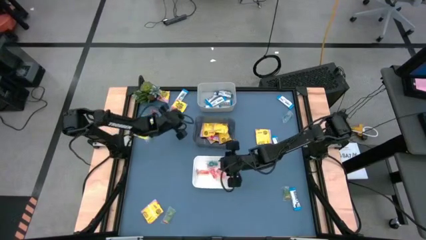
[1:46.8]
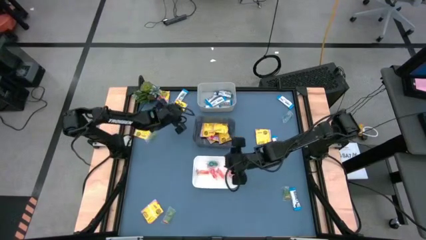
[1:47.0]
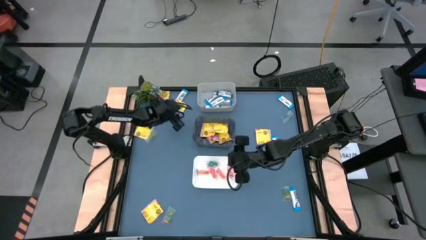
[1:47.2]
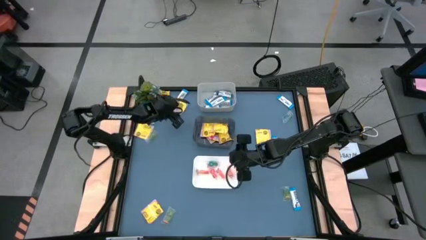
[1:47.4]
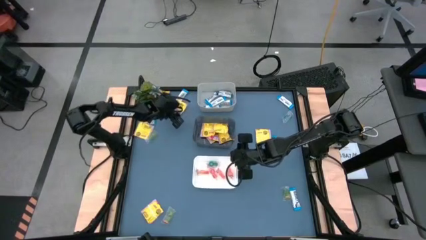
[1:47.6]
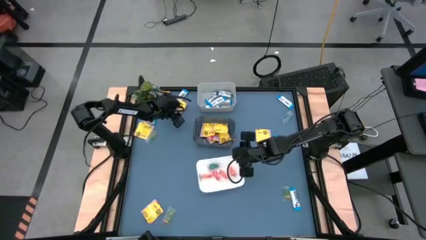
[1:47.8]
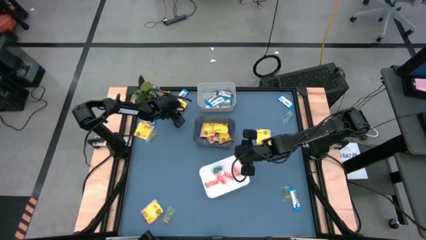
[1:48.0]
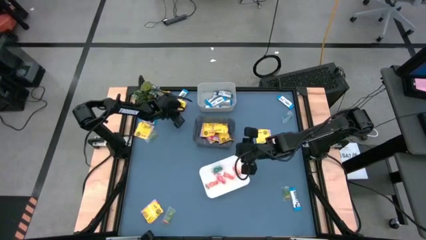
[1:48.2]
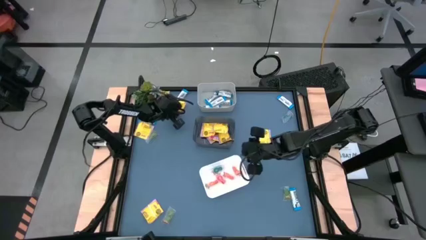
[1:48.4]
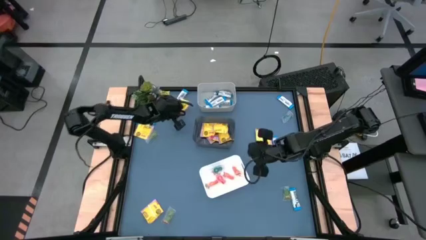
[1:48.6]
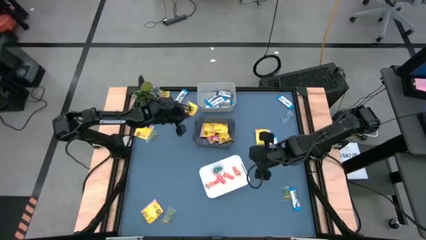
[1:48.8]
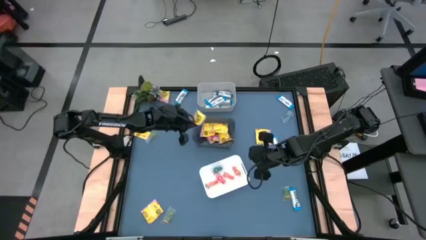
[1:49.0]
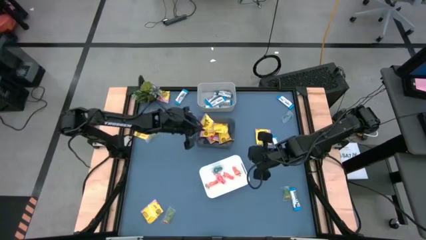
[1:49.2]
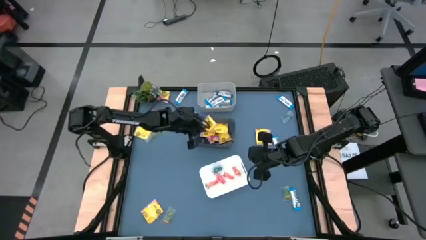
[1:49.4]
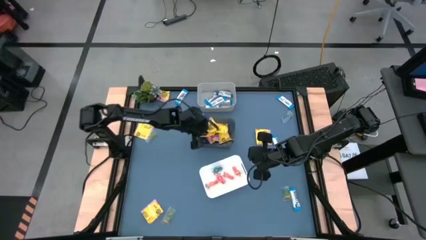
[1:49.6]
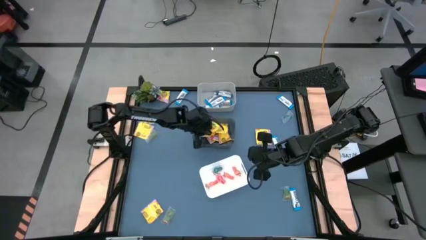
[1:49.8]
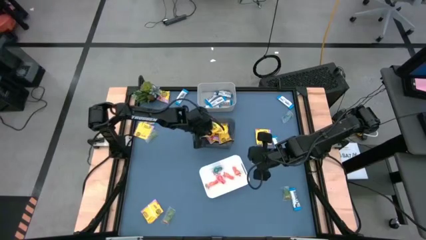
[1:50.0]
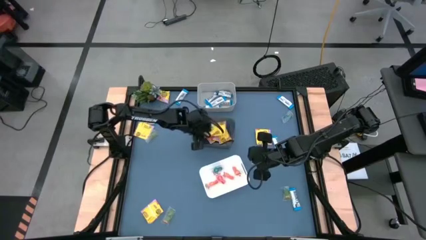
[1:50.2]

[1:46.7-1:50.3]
Task: Sort candy
Put the yellow candy into the black bin

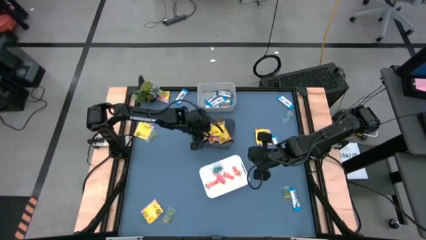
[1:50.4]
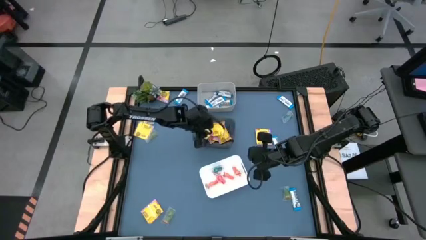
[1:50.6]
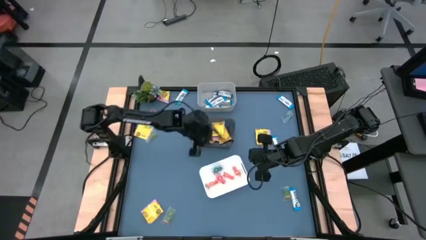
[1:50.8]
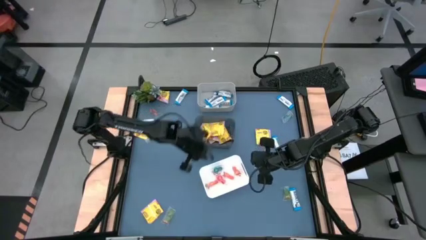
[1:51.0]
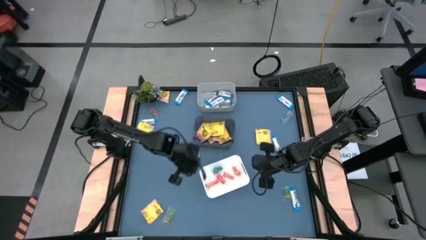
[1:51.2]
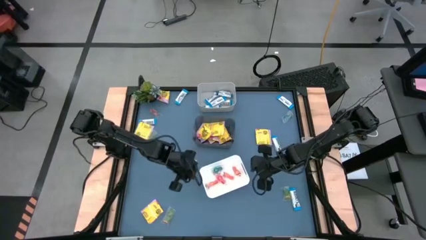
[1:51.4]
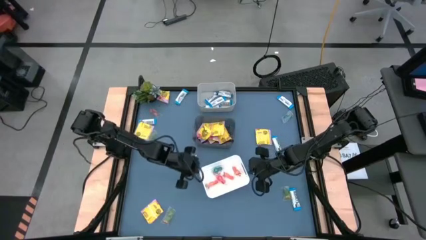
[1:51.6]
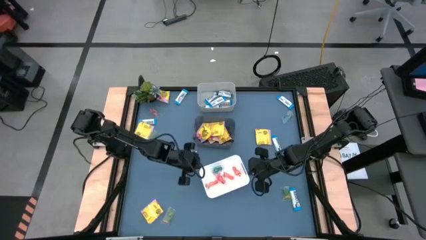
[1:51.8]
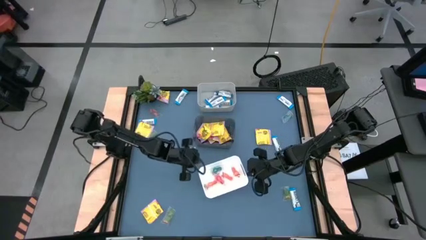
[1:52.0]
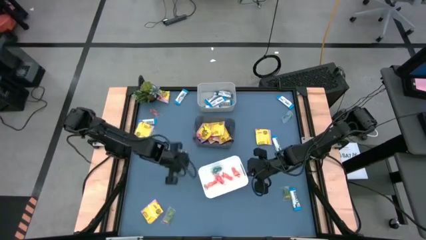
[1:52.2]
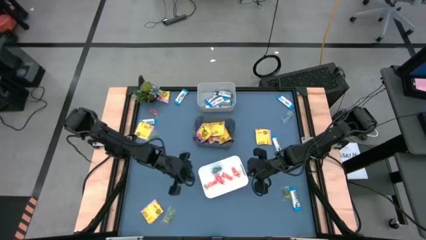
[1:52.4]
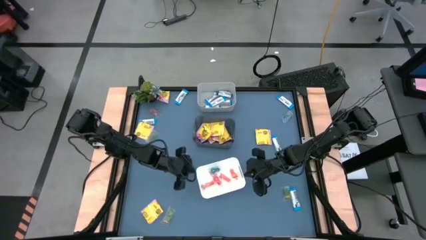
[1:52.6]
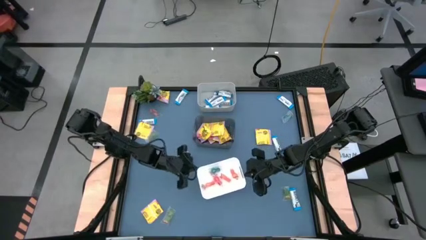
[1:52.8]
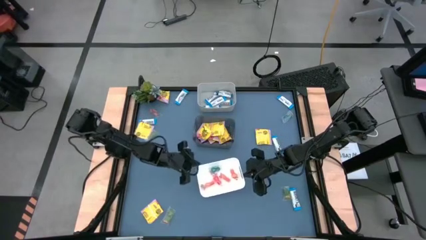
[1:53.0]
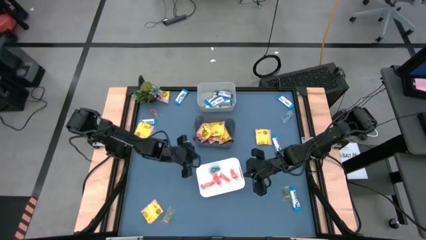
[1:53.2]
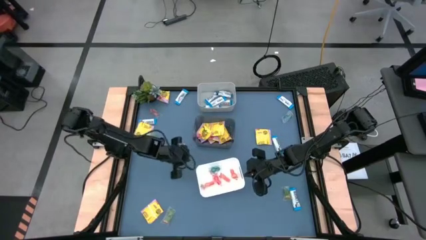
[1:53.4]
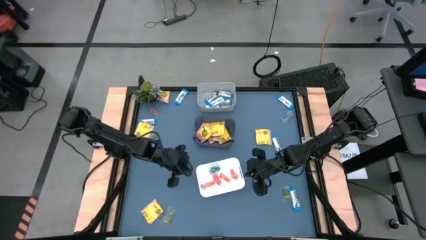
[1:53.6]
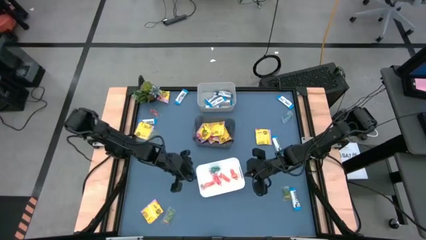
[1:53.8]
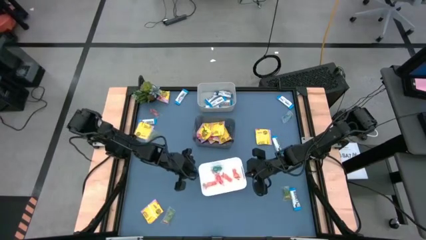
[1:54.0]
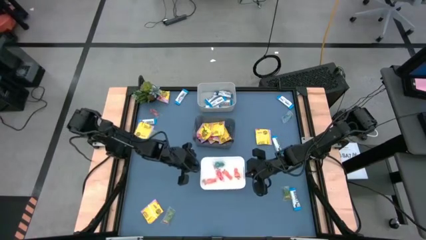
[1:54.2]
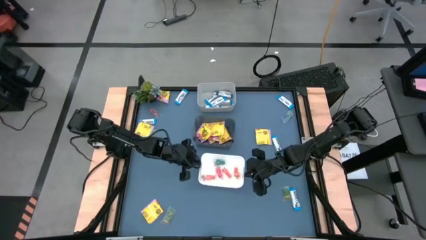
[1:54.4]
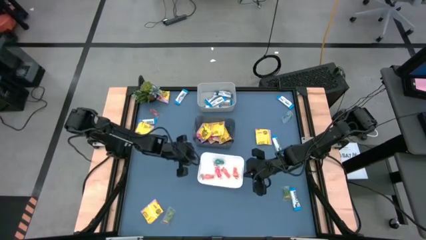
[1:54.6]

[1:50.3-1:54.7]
Adjust the white bin

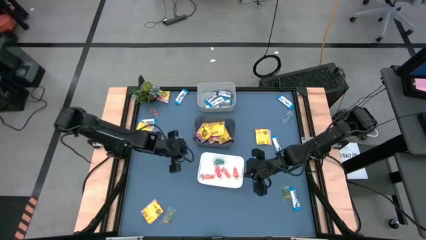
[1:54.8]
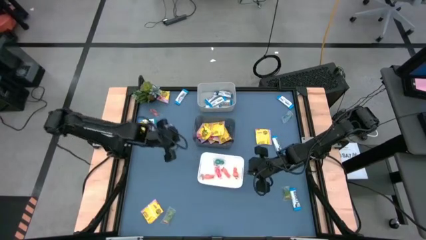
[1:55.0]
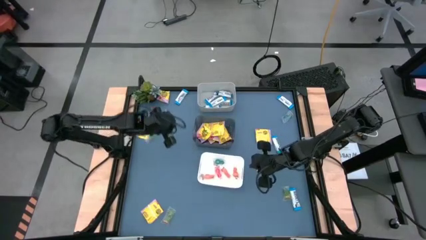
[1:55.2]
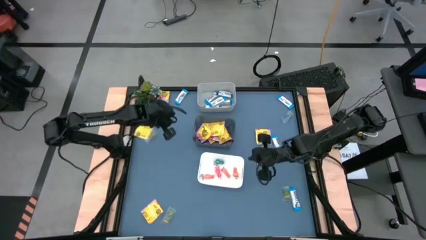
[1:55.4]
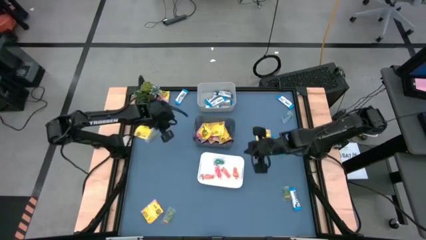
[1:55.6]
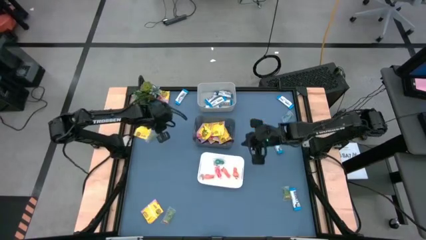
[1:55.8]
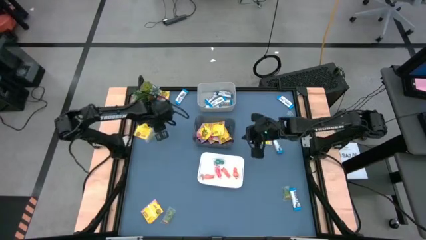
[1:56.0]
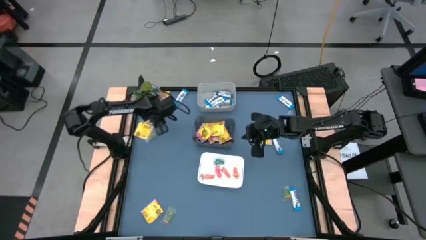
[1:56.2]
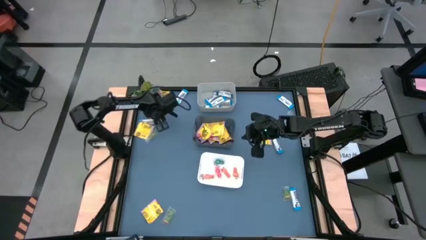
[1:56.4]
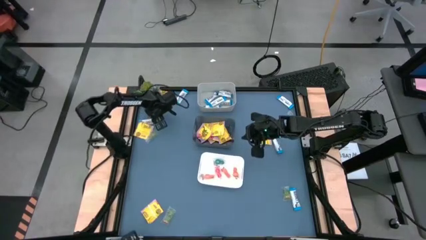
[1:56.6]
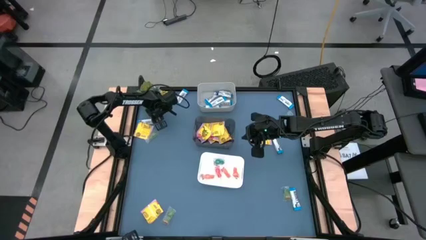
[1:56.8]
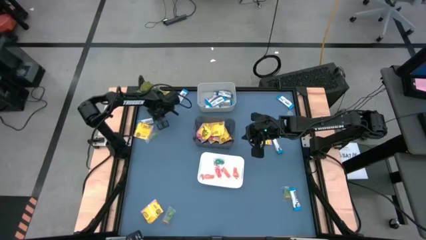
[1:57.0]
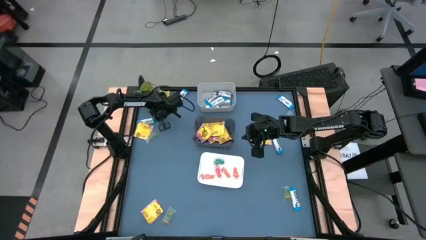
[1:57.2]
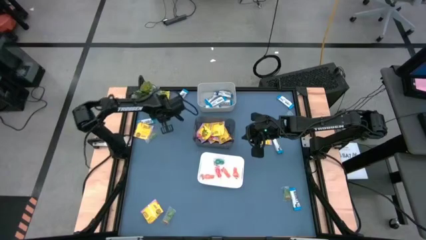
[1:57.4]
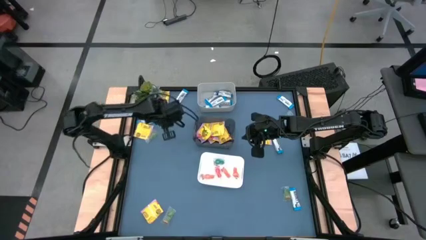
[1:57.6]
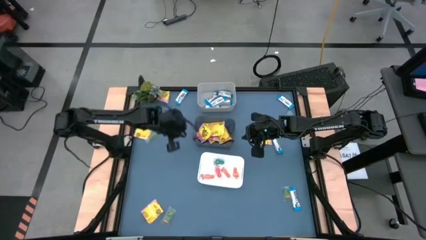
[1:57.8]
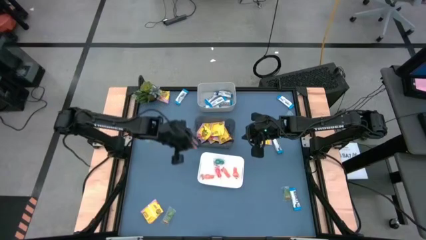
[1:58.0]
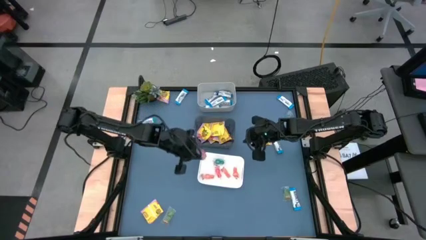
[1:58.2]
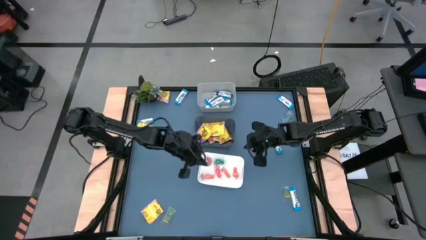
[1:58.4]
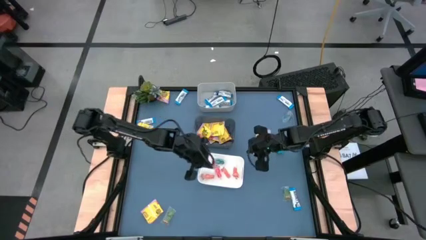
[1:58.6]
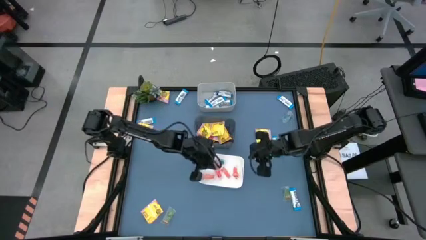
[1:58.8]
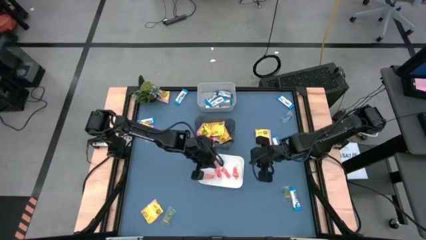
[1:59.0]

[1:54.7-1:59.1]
Put the orange gummy candy into the white bin

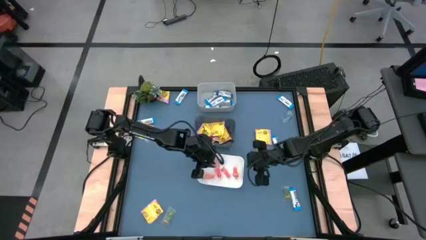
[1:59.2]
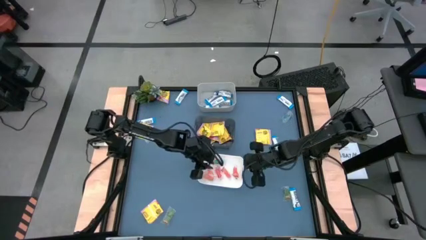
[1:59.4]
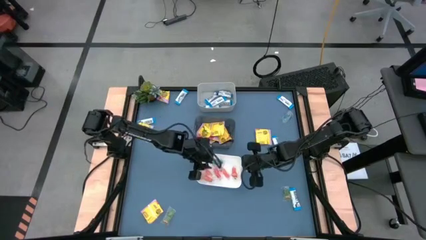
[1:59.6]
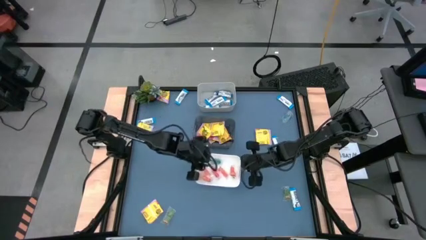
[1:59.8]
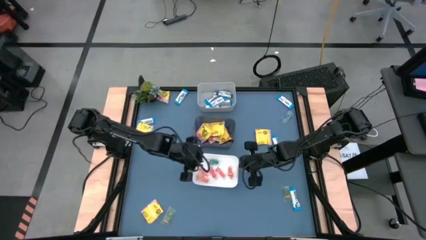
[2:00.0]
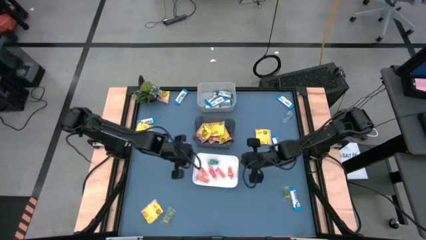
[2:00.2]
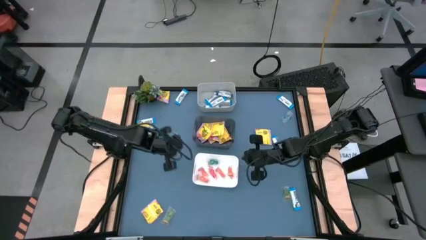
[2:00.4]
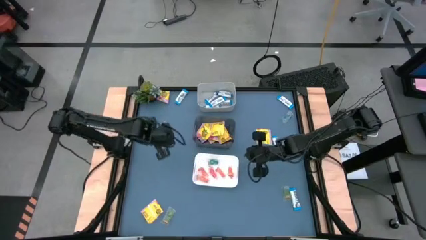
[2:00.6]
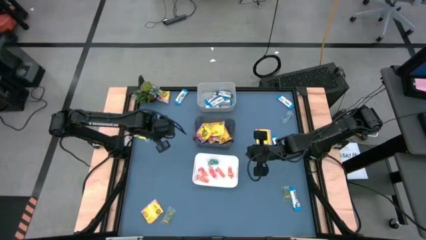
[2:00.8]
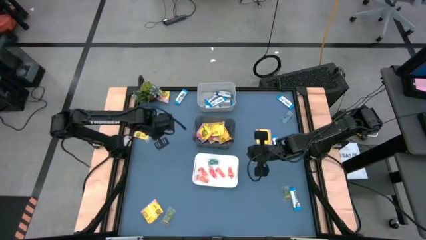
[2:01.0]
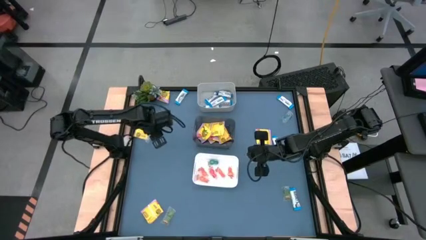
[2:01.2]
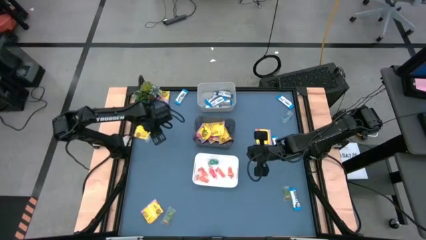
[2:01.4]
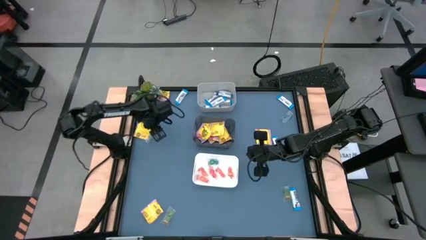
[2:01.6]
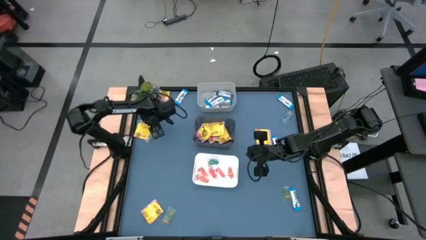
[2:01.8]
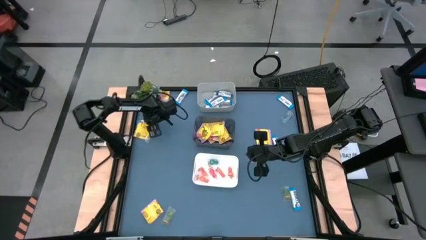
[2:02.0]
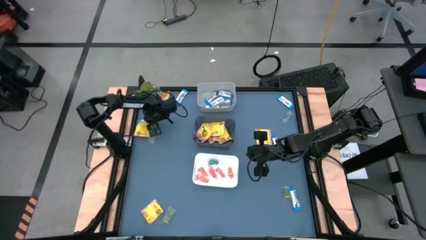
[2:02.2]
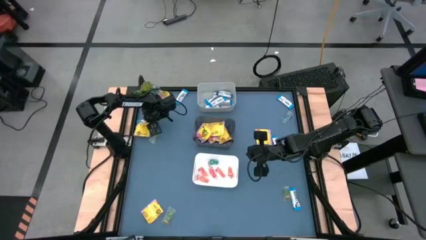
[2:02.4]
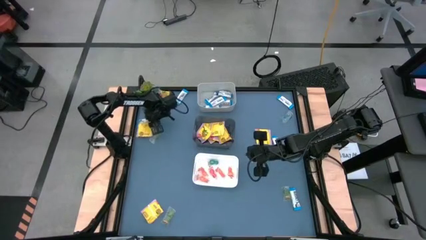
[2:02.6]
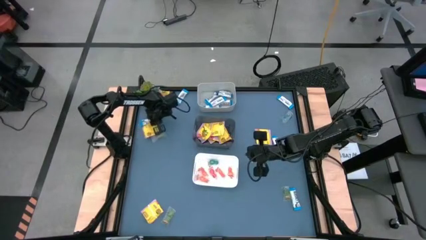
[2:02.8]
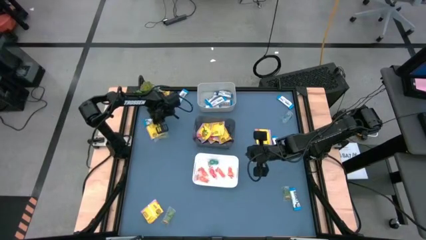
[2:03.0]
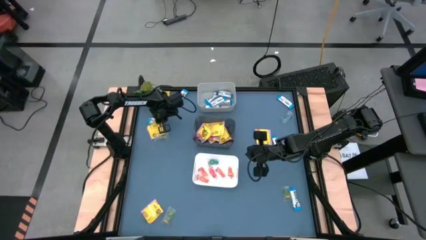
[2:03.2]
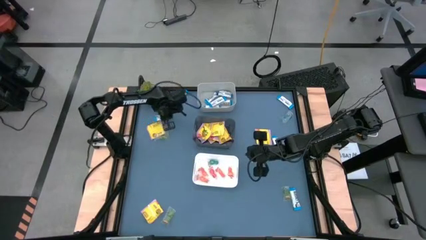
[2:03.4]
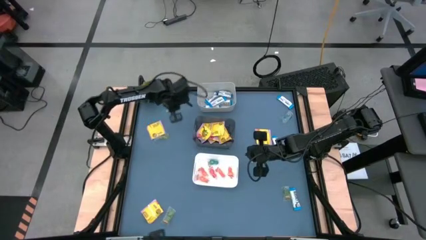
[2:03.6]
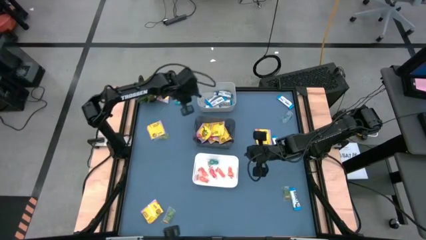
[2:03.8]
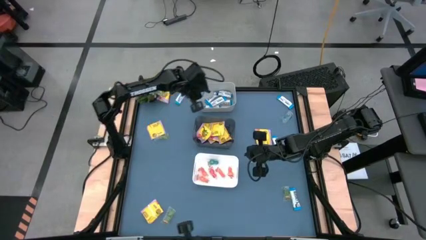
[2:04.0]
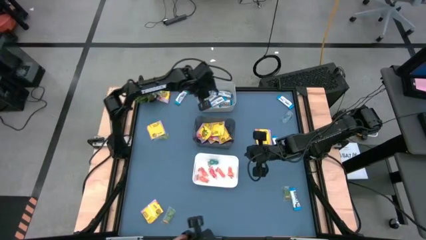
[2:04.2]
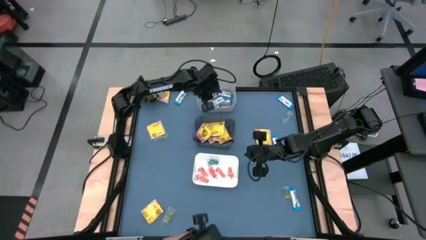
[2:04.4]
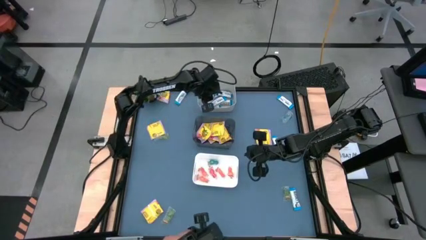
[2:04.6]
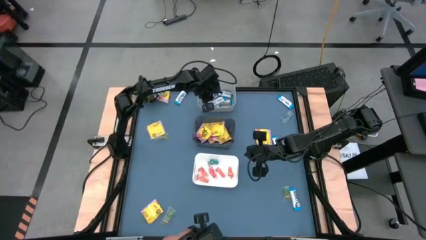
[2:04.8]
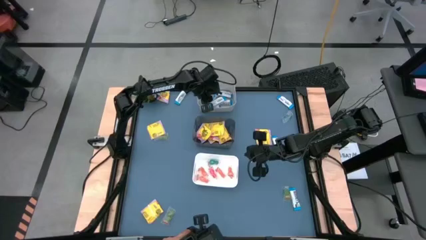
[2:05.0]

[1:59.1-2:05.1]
Put the white chocolate bar into the gray bin
